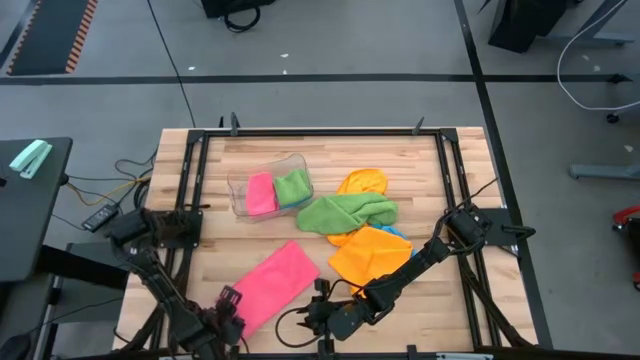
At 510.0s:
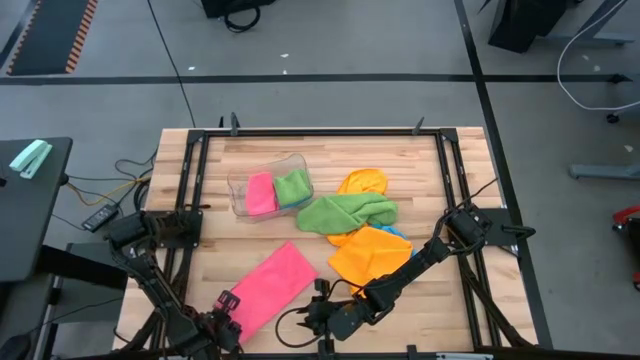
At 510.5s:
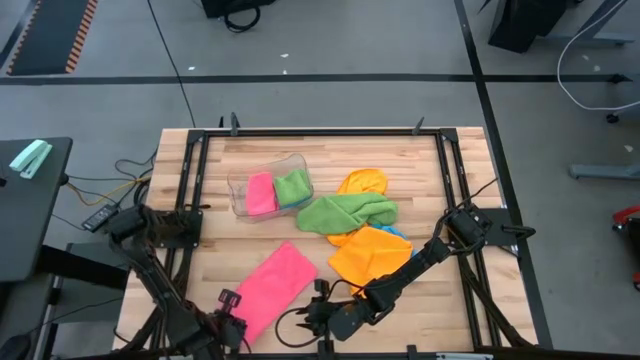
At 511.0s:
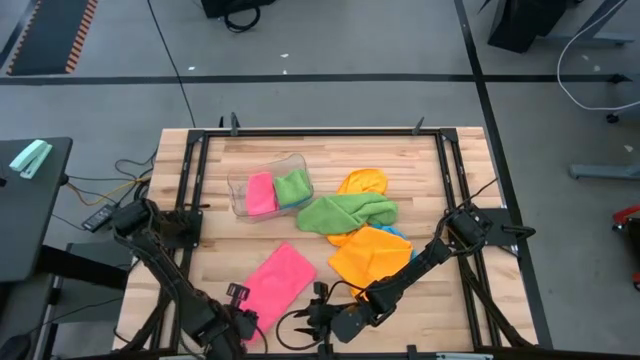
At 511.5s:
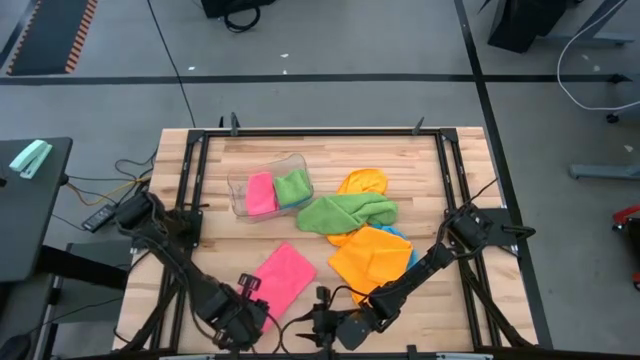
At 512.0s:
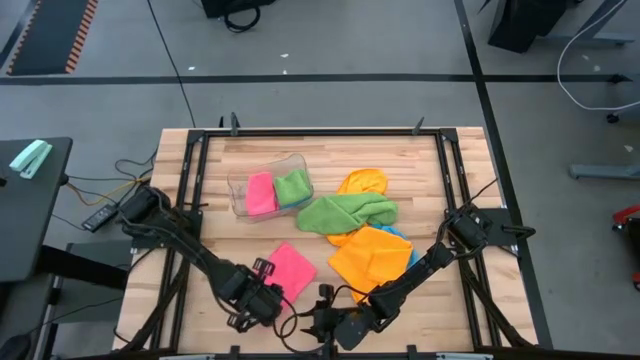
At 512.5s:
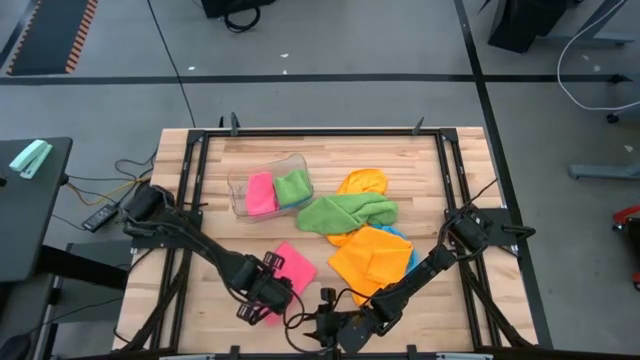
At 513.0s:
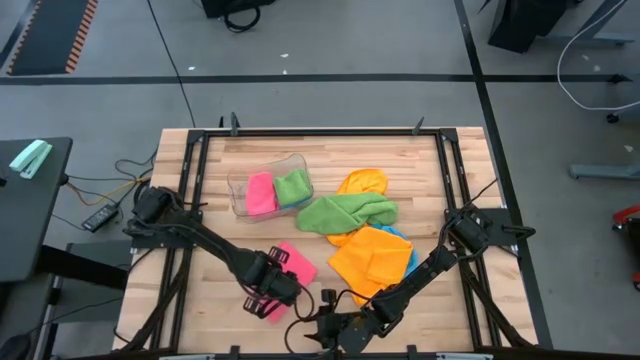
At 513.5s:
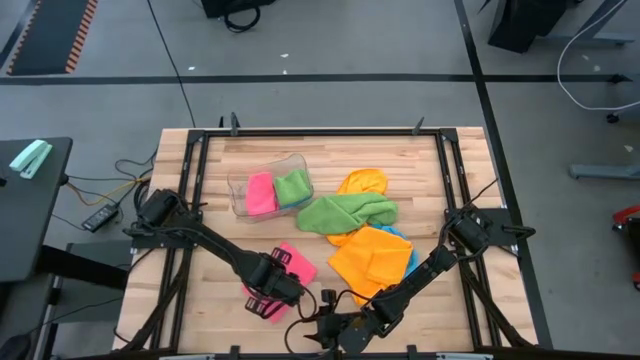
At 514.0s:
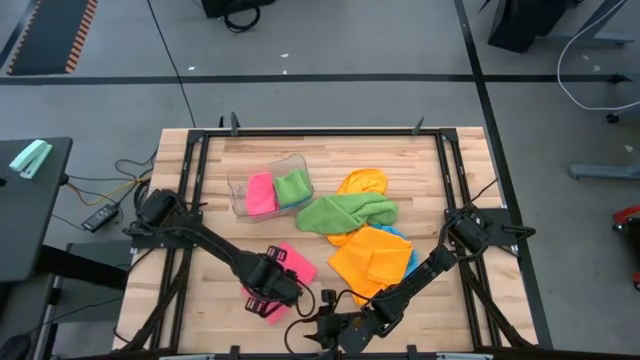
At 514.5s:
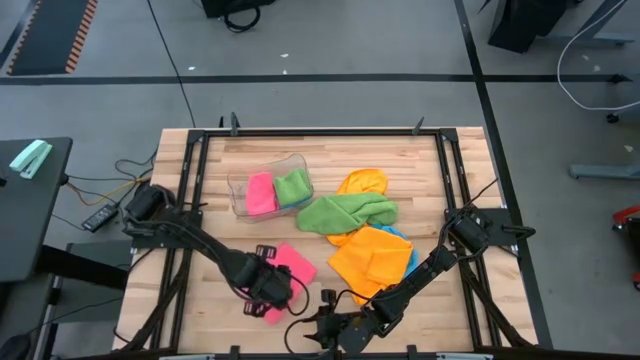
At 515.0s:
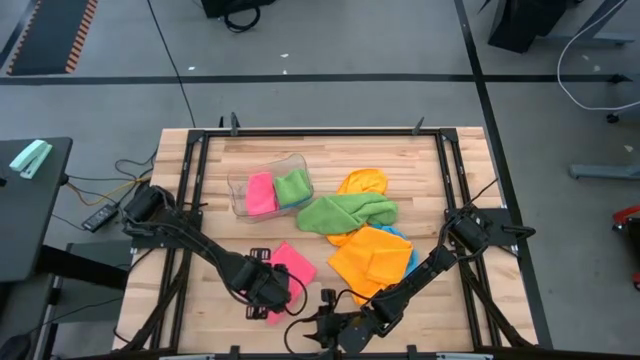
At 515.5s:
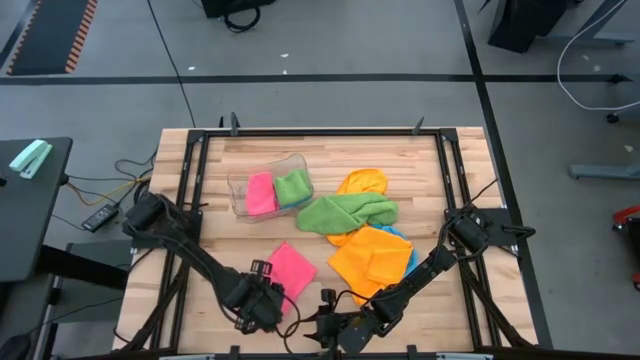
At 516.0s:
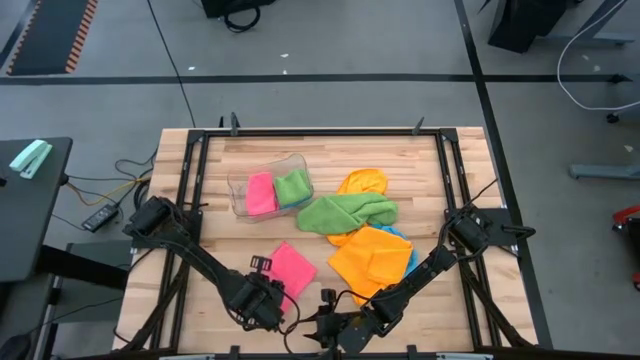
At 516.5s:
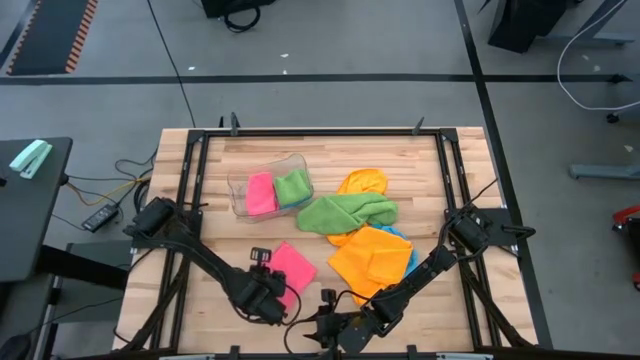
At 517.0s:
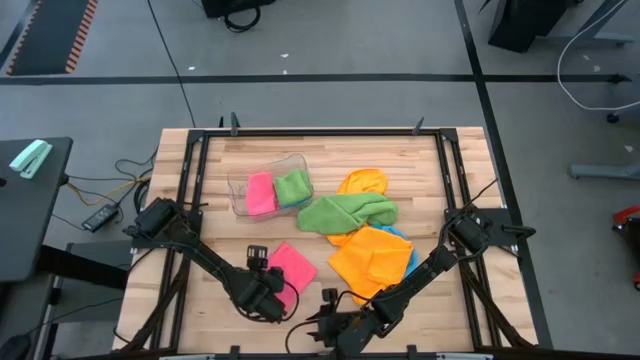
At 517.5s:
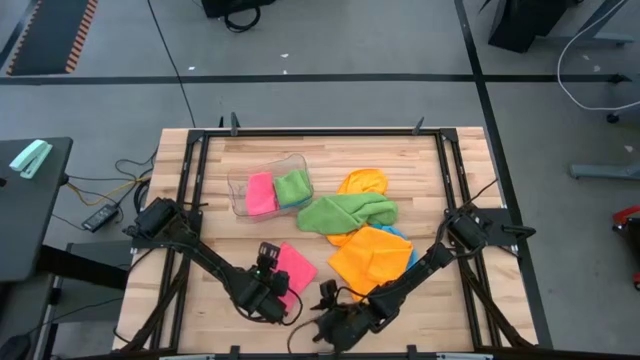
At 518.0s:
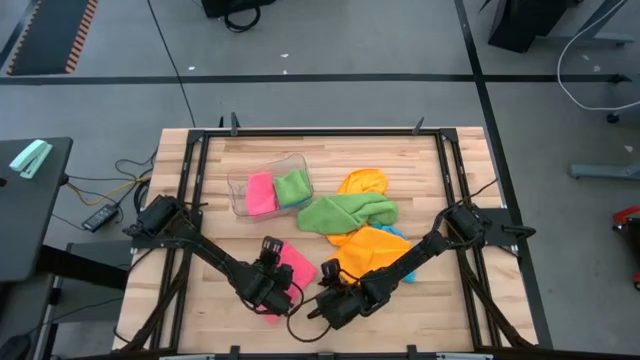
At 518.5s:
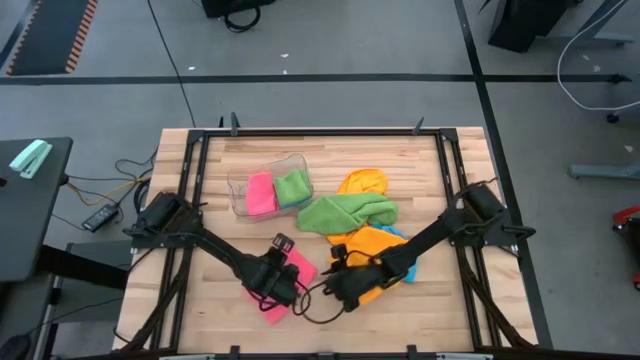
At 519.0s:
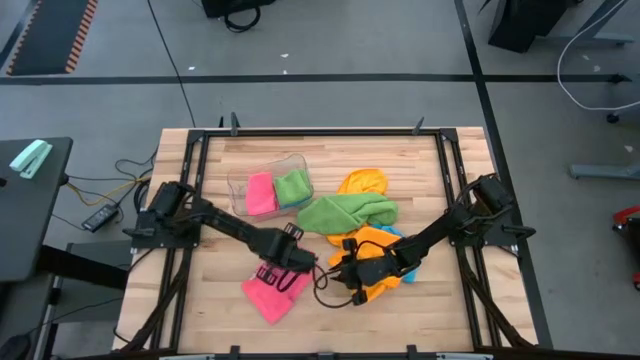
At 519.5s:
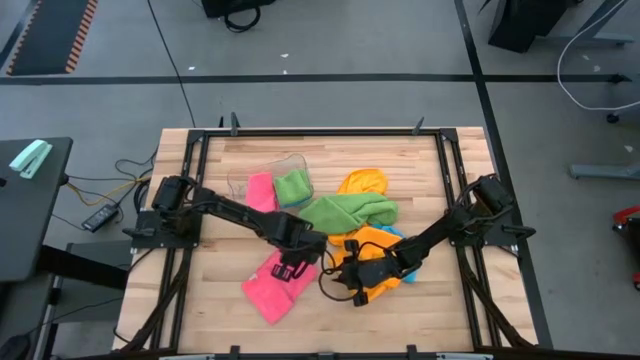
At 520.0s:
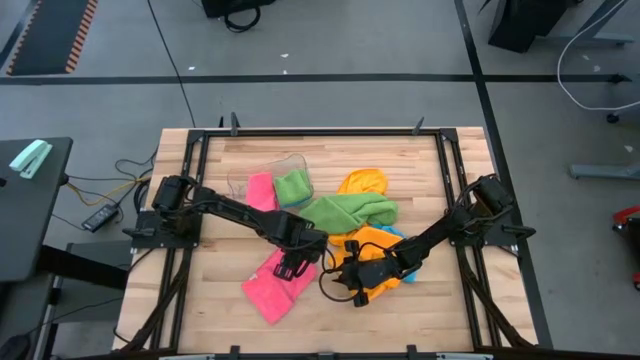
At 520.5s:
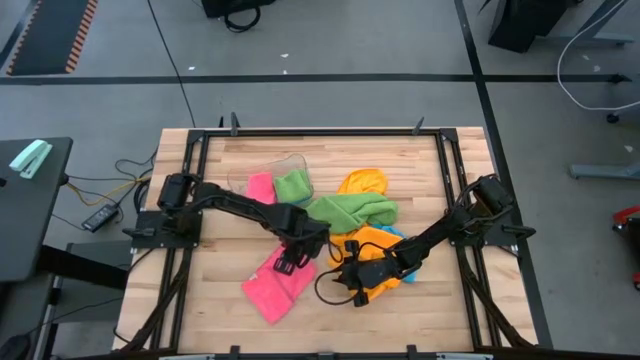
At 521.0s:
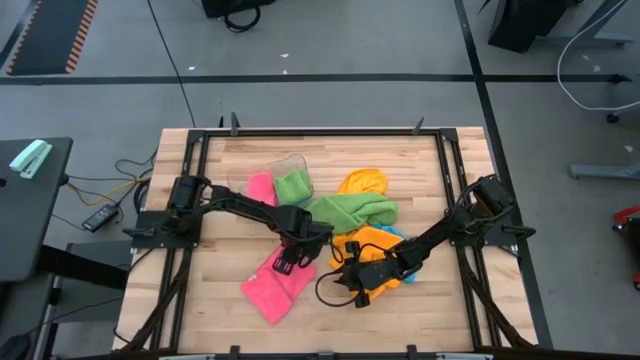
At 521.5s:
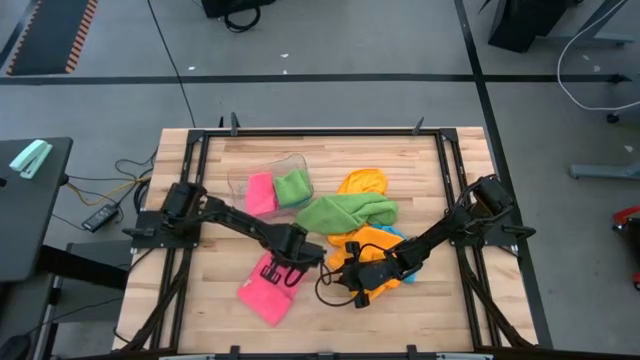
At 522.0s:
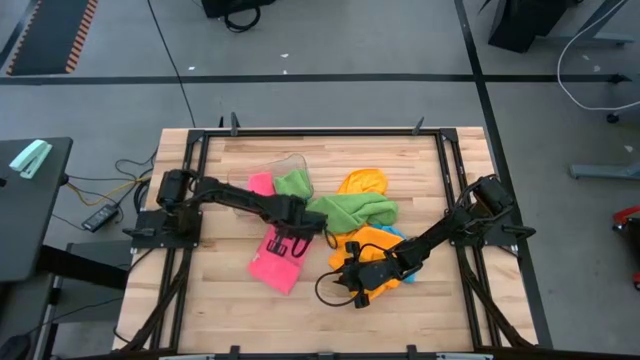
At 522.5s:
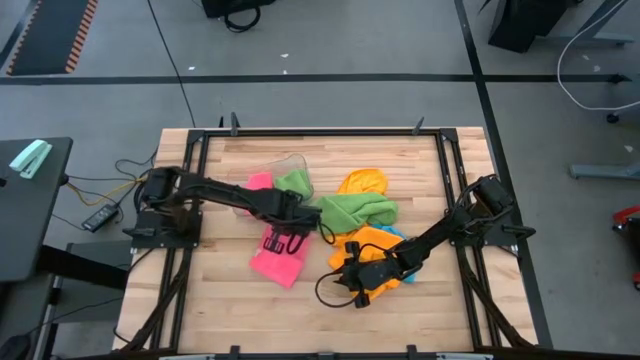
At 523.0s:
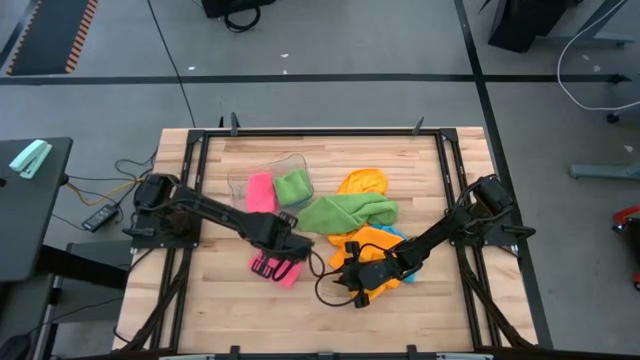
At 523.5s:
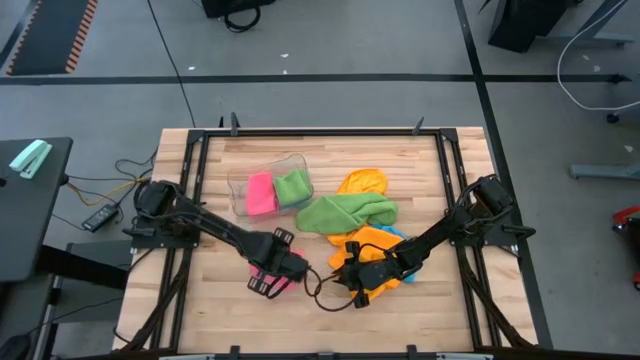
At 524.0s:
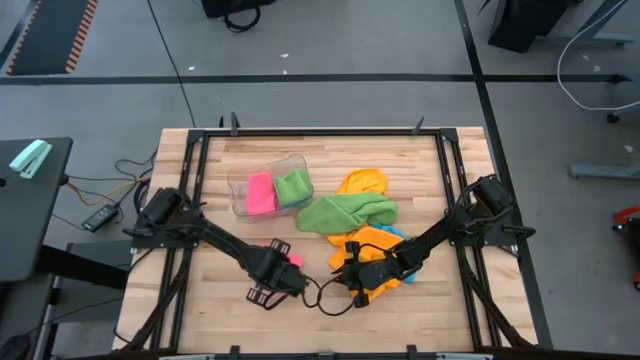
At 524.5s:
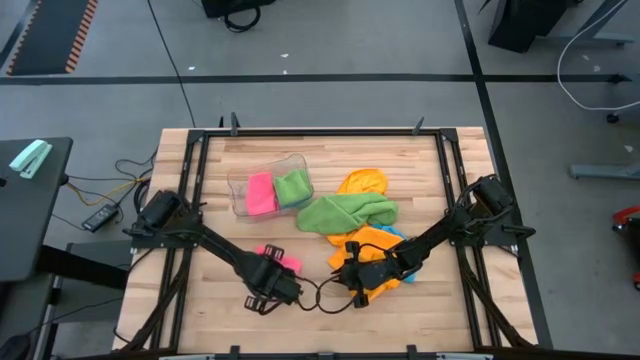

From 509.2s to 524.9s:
Task: Fold microfiber towels
Fold the pink microfiber towel

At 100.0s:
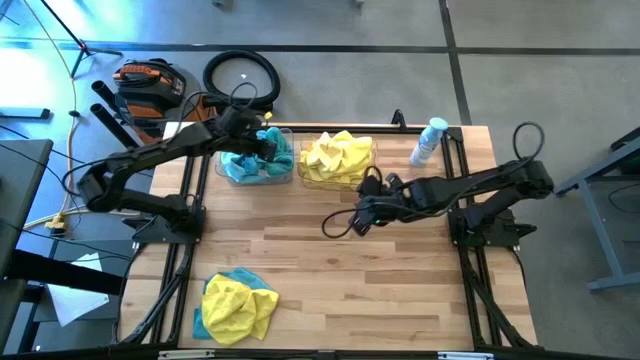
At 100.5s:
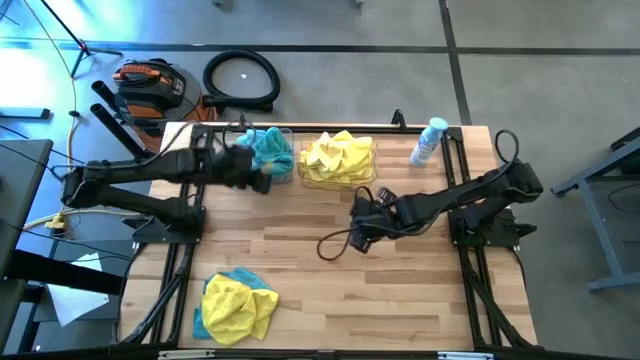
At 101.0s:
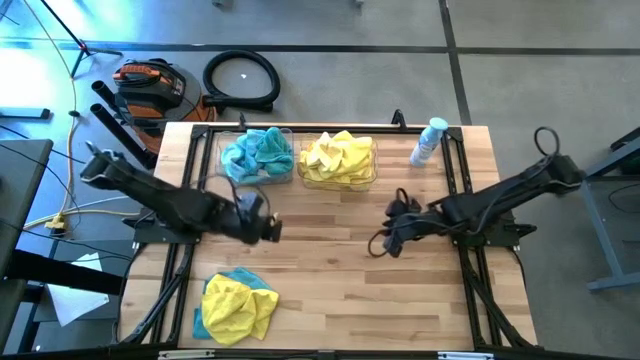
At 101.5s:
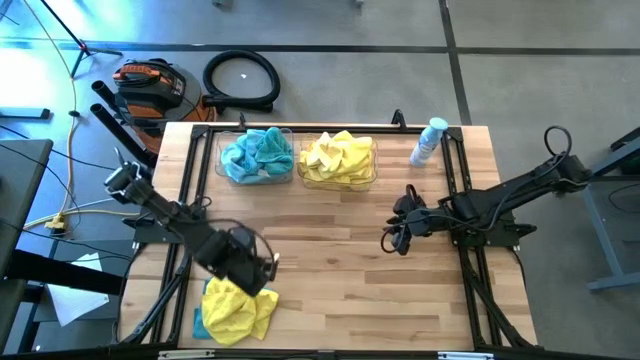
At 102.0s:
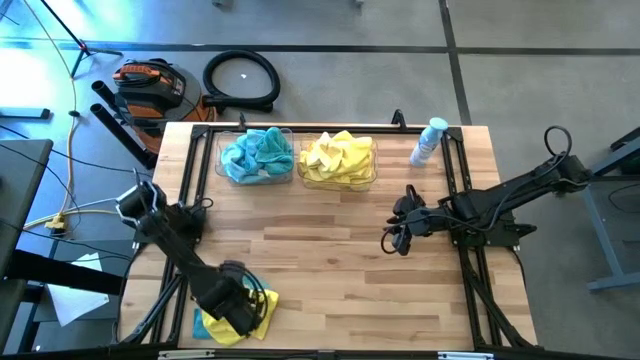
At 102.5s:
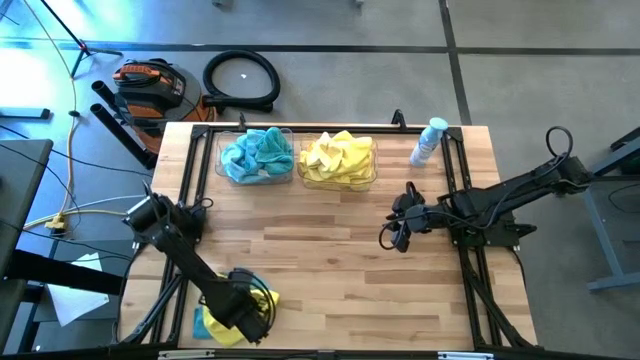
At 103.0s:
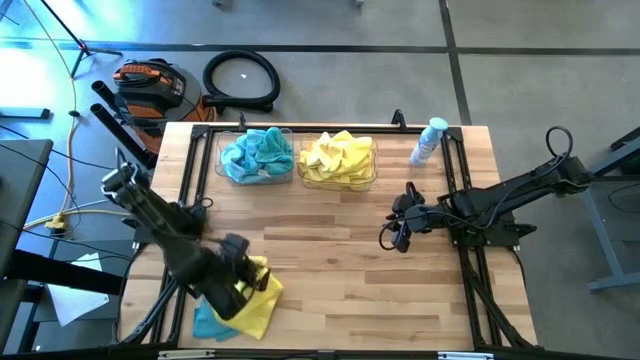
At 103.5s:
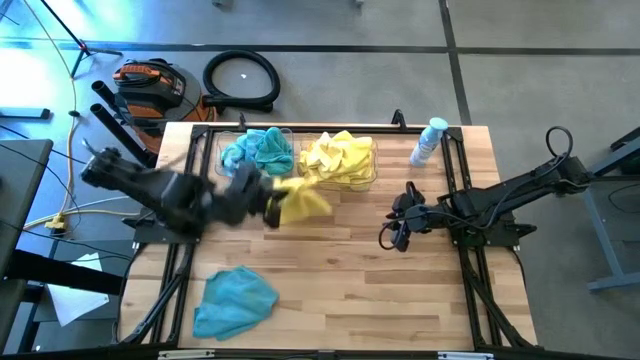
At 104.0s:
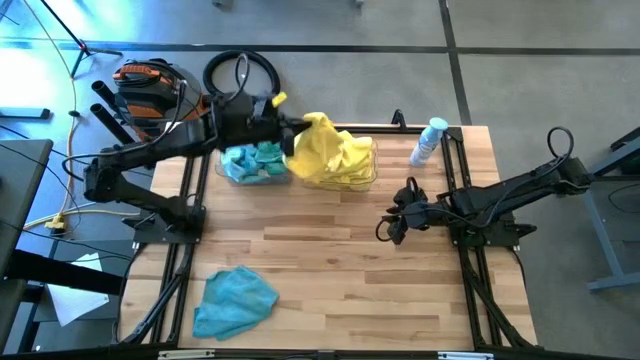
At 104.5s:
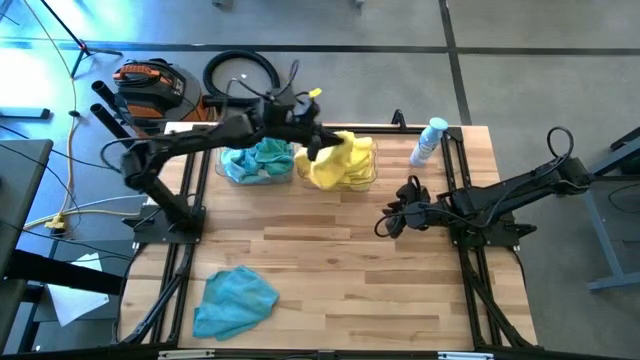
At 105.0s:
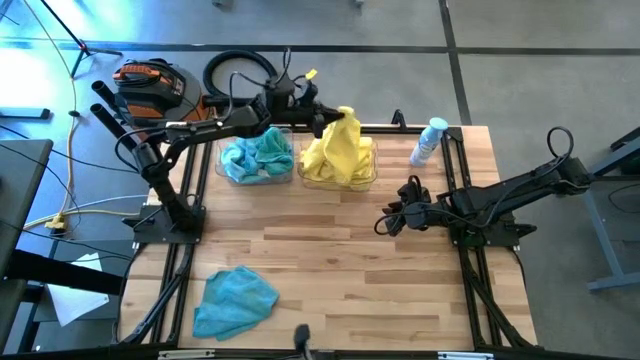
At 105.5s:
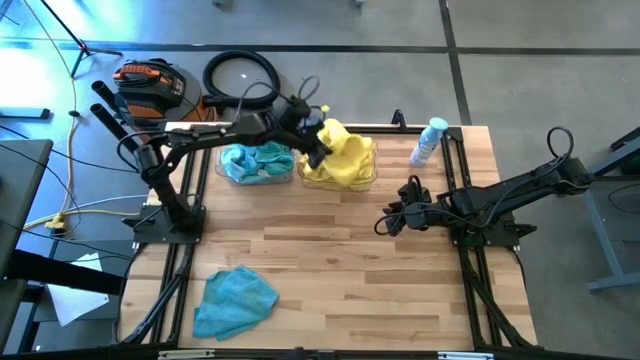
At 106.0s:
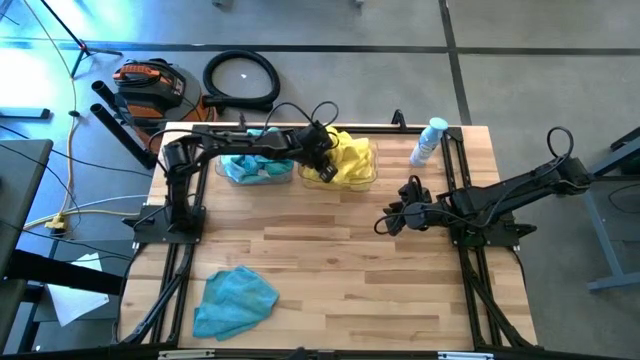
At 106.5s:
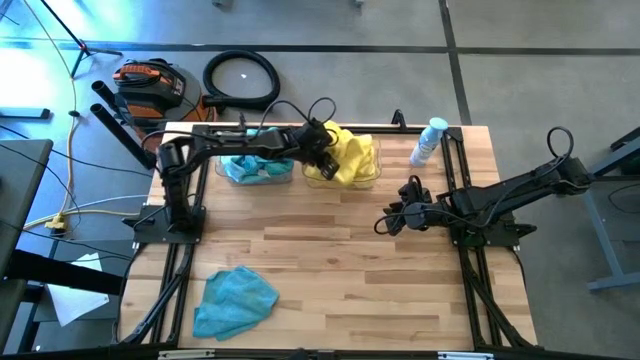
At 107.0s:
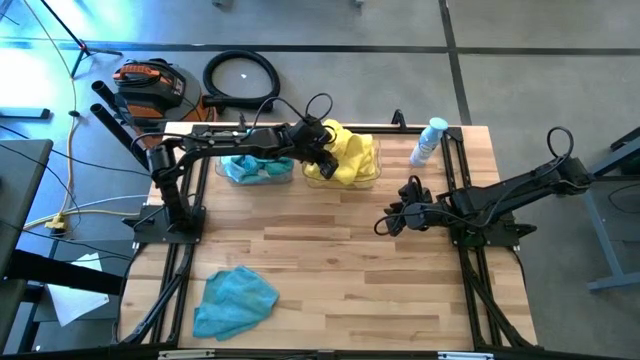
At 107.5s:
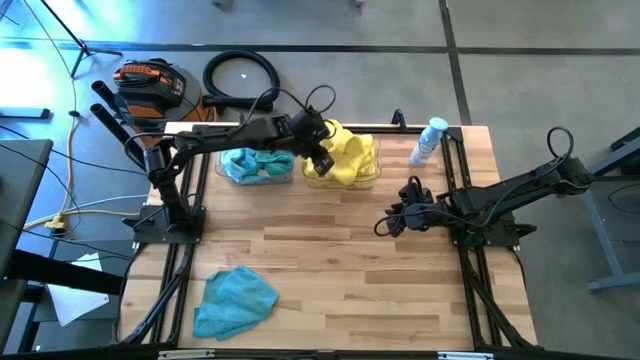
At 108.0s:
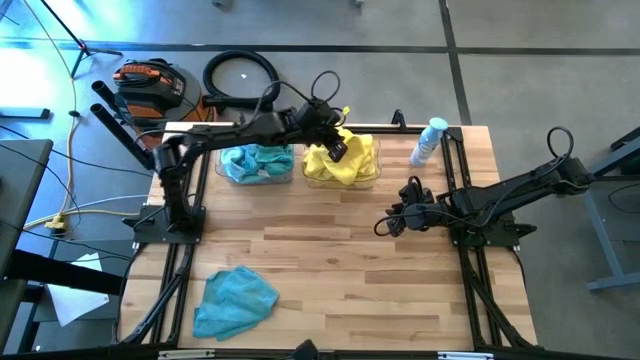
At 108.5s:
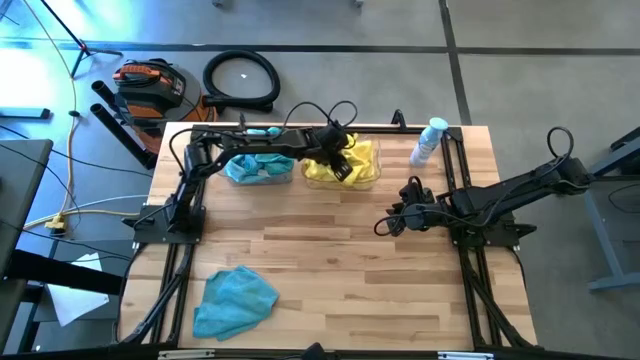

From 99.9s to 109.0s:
Task: Sort microfiber towel by color & place in baskets
Put the yellow towel into the right transparent bin
